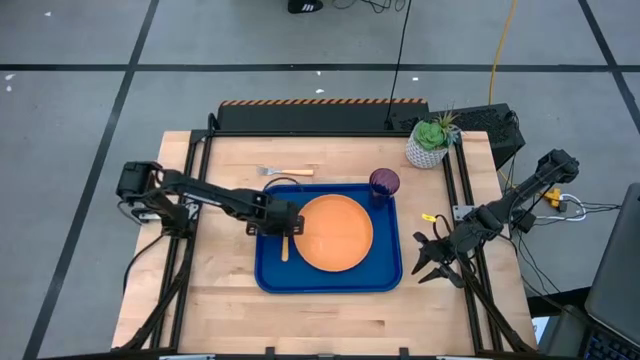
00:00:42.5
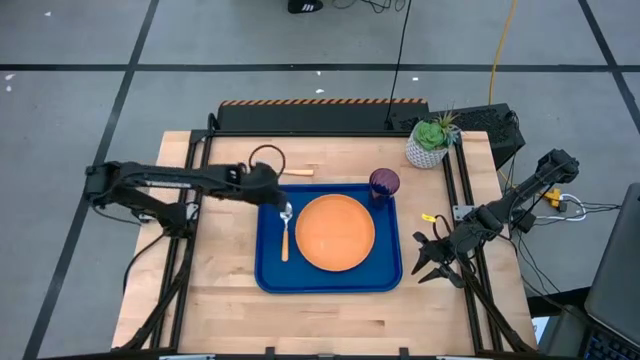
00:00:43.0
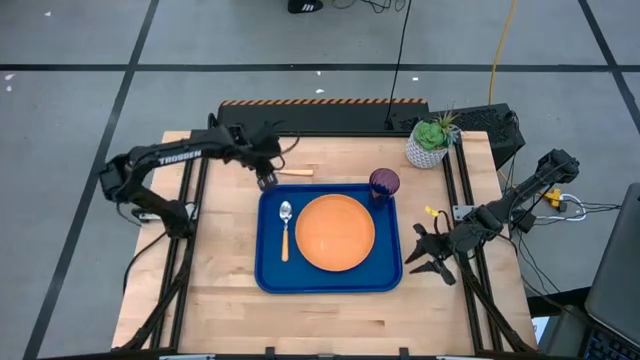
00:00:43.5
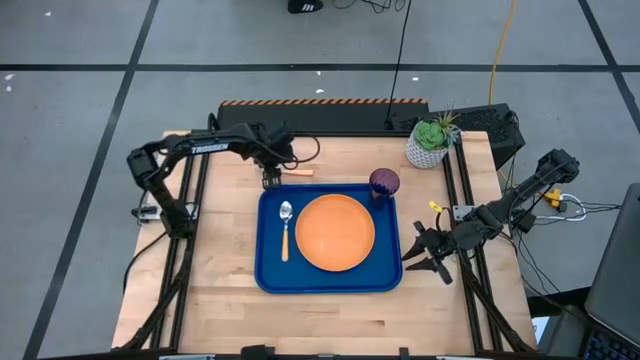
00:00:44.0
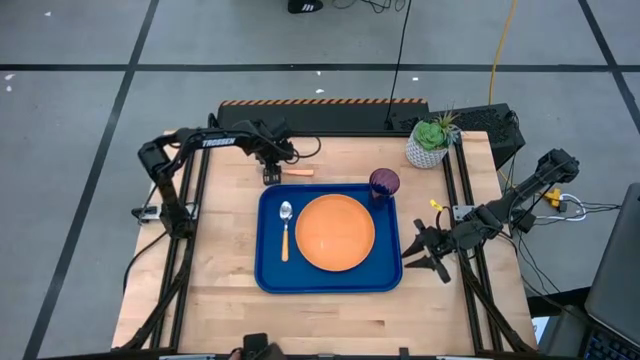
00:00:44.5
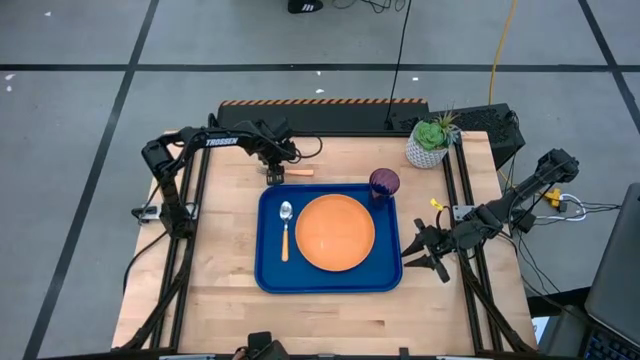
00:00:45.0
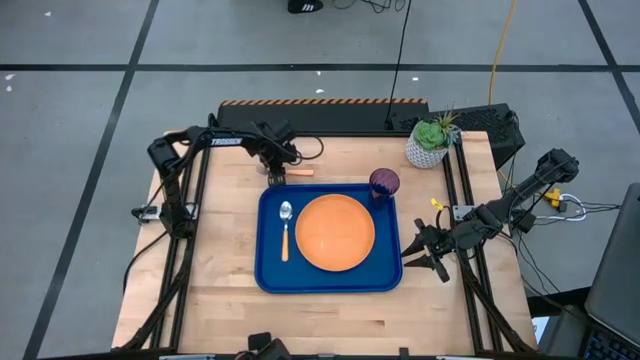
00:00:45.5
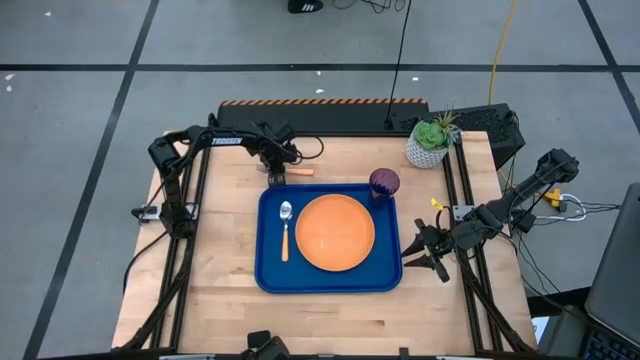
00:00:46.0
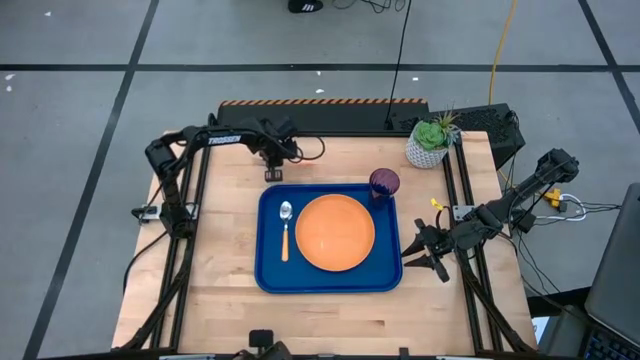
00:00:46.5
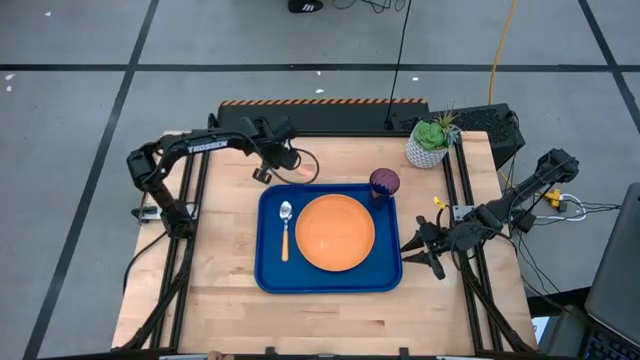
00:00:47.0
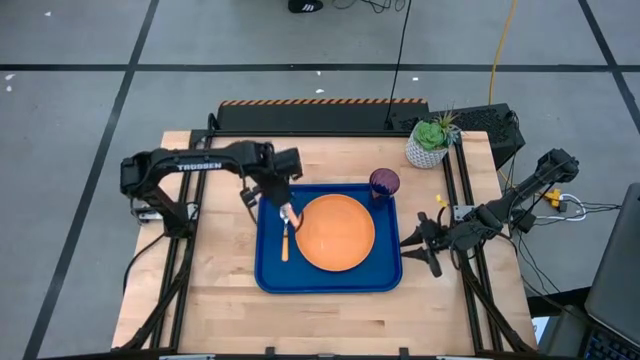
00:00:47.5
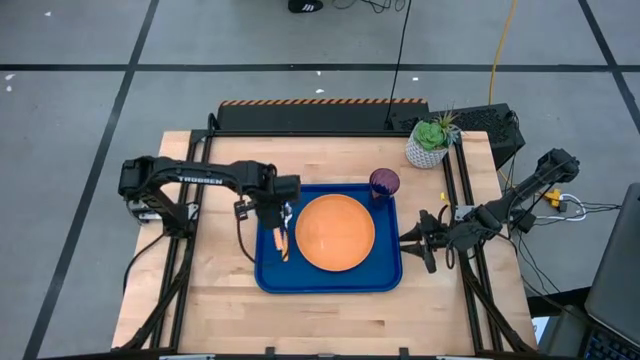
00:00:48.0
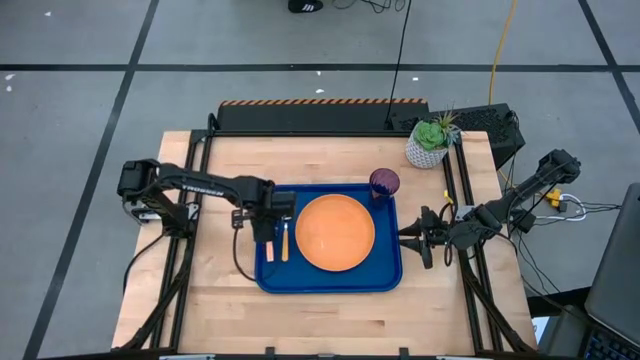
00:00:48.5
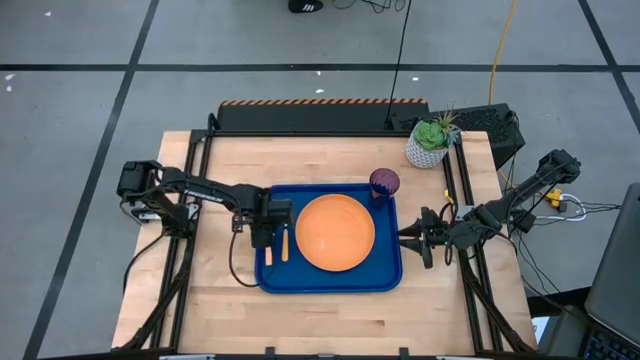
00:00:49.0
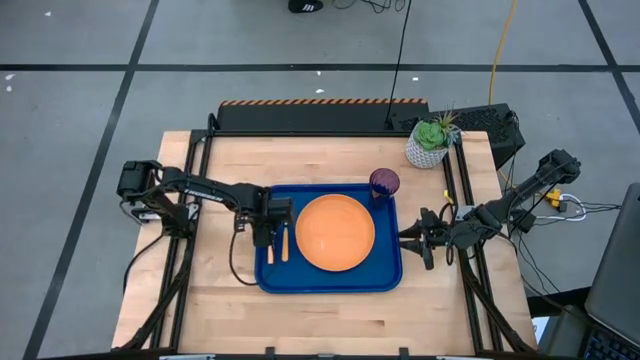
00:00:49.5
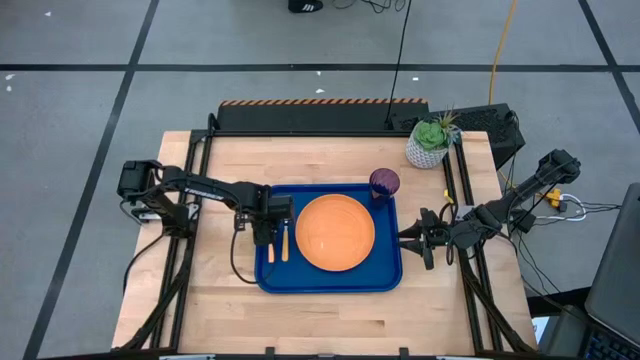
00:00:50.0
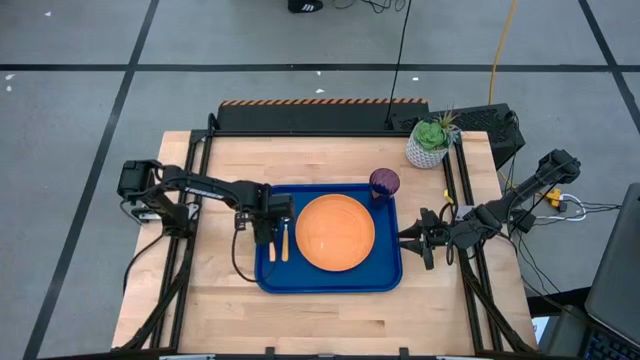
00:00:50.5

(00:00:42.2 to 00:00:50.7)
Task: Pick and place plate/cup/fork/spoon on tray
Put the orange fork to the left of the orange spoon on the blue tray

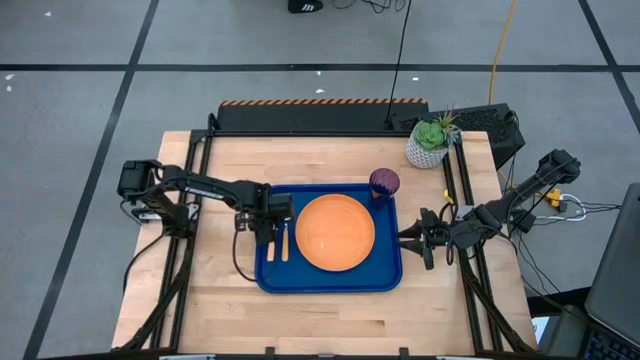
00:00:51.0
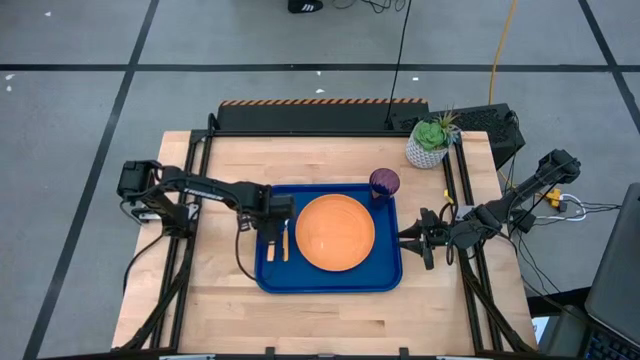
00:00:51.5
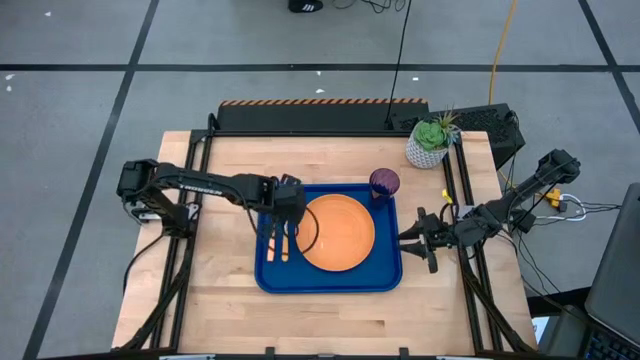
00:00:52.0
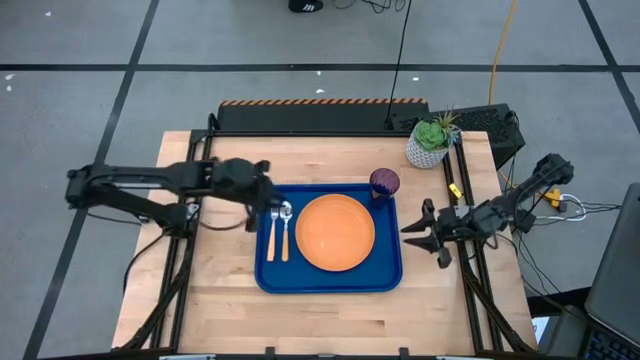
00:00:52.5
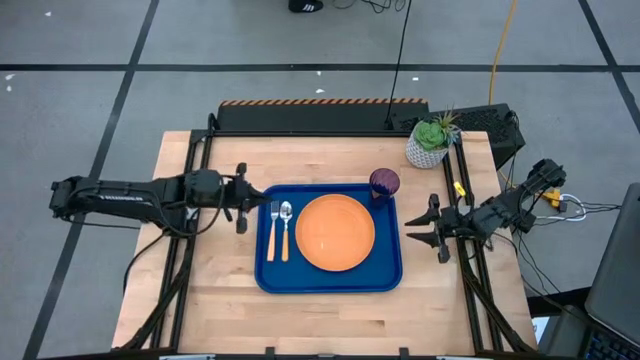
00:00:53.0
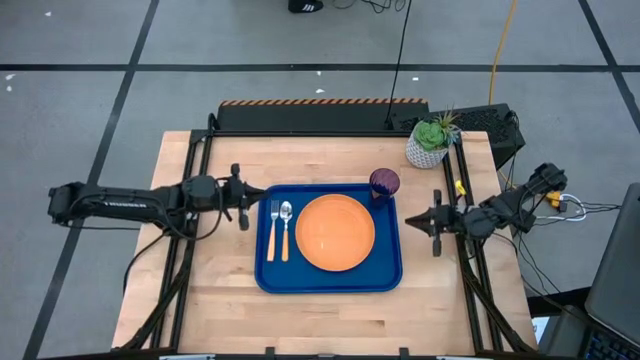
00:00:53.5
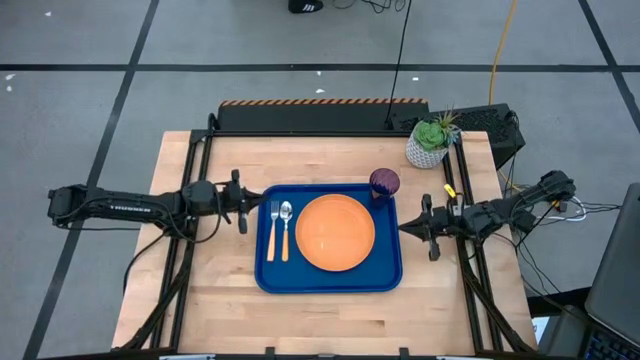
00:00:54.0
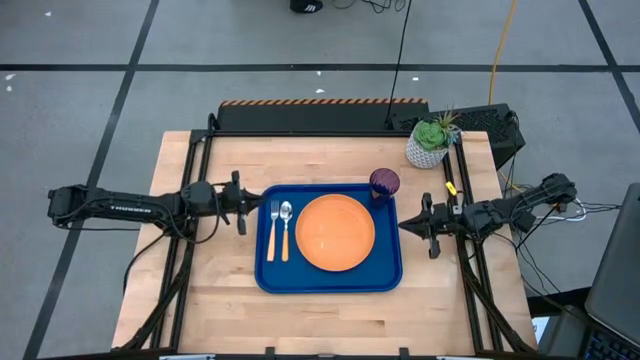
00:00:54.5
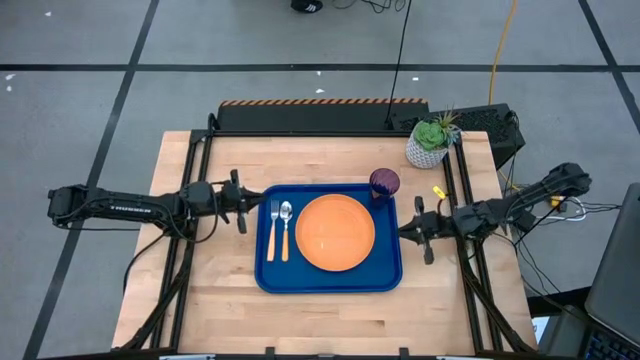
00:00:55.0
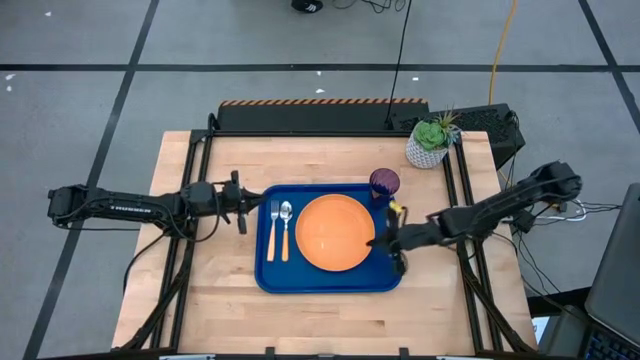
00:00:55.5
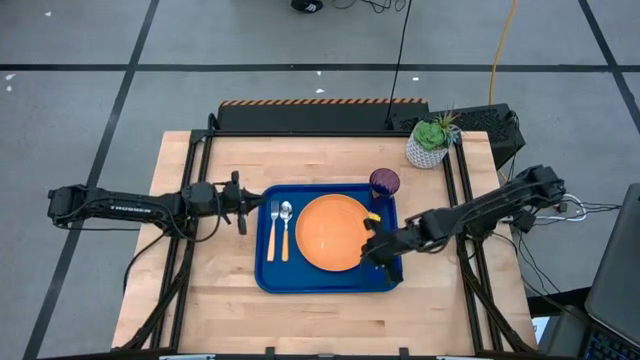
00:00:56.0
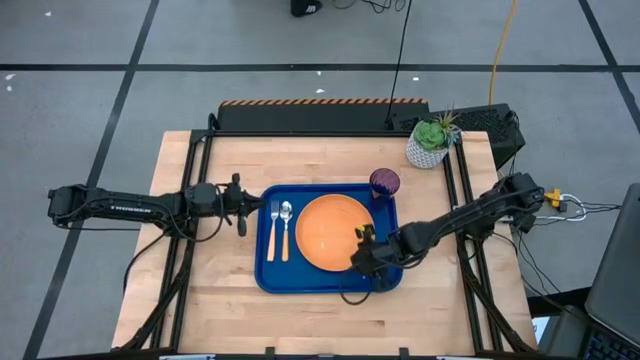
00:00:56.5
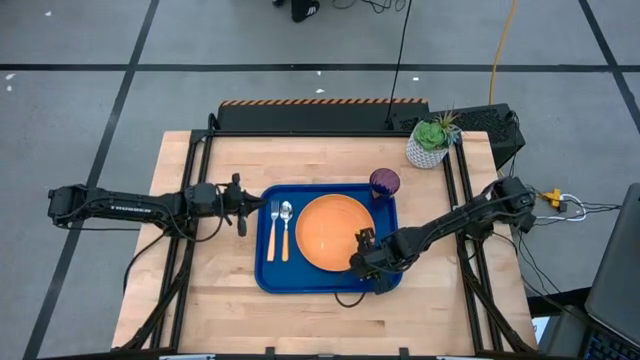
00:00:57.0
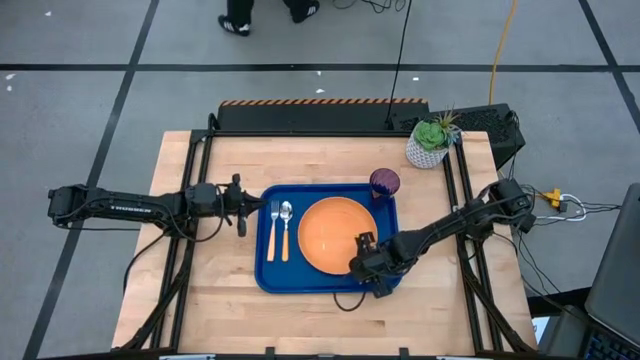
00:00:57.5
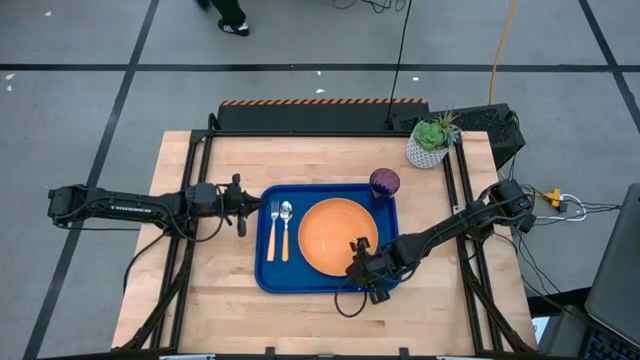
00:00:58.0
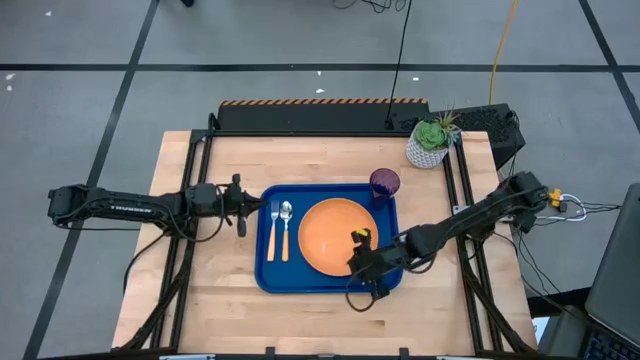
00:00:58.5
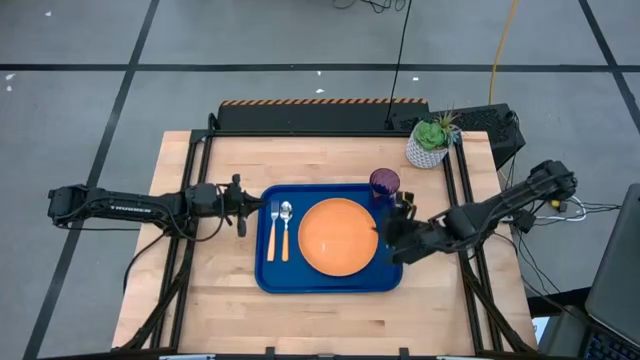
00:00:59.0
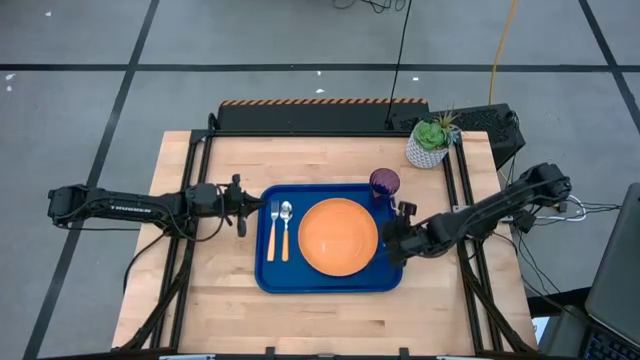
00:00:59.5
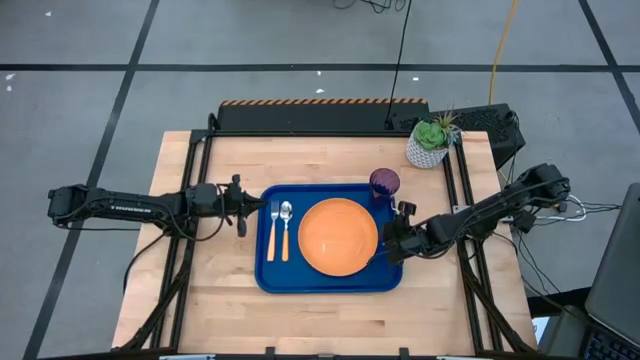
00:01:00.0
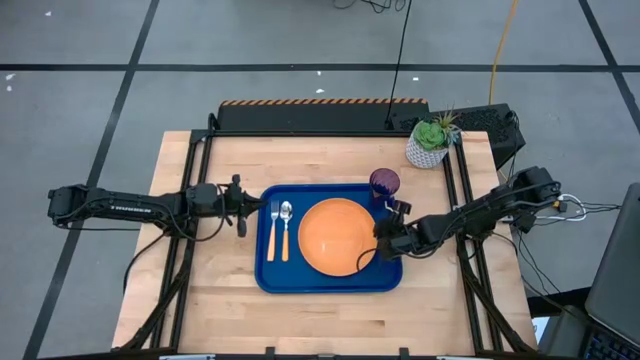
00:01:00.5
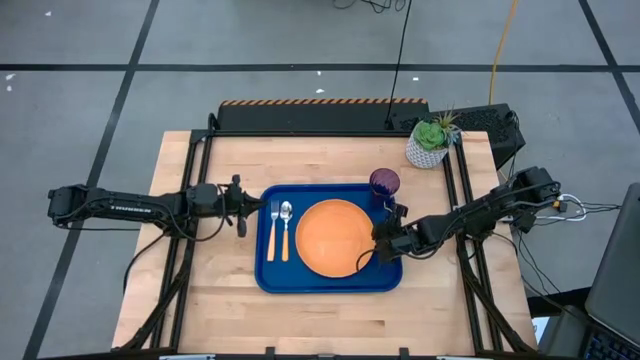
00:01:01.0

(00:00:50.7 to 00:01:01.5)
Adjust the plate on the tray

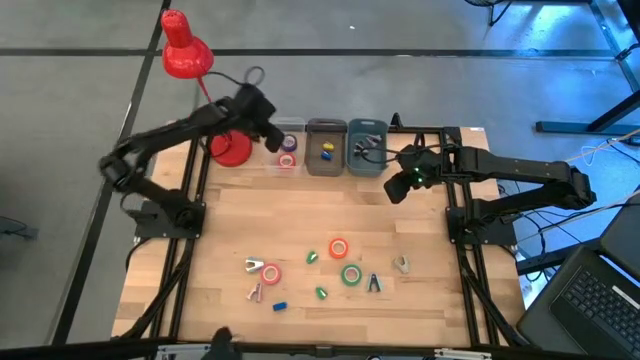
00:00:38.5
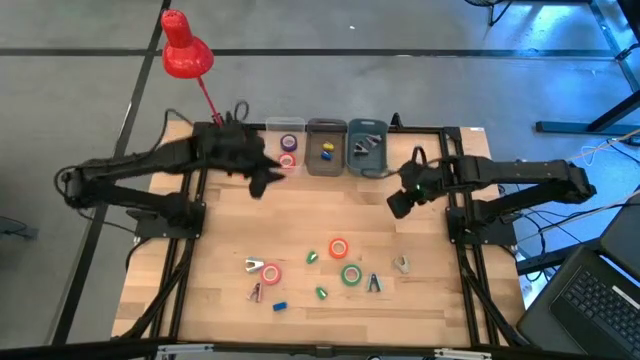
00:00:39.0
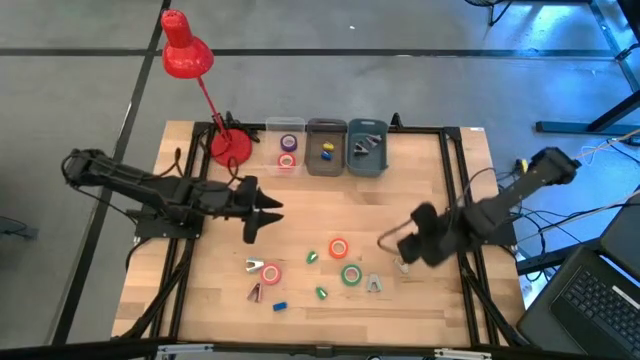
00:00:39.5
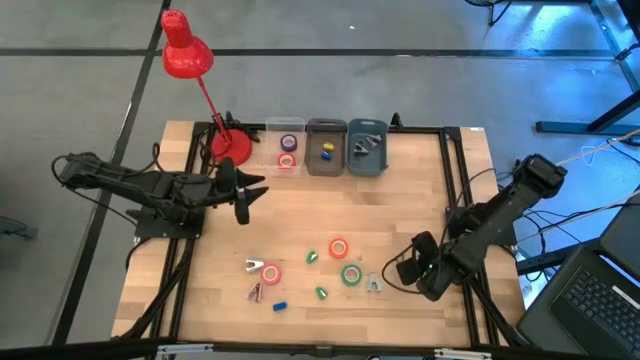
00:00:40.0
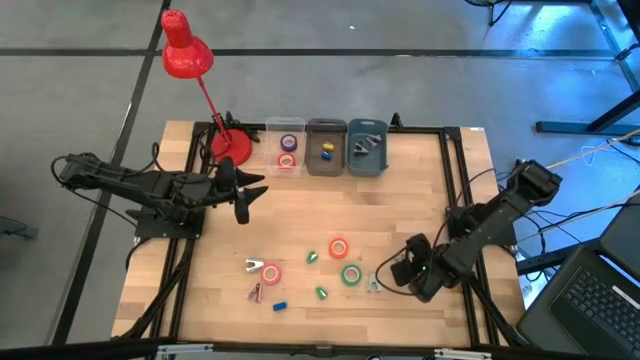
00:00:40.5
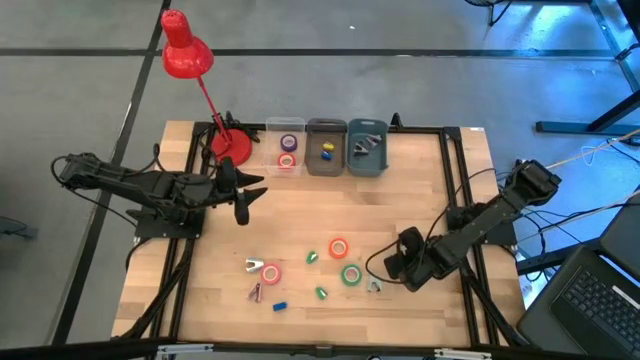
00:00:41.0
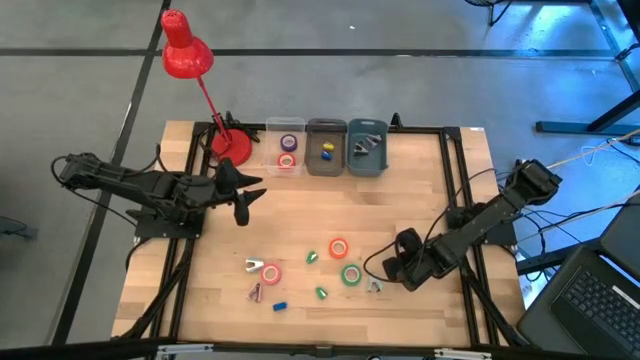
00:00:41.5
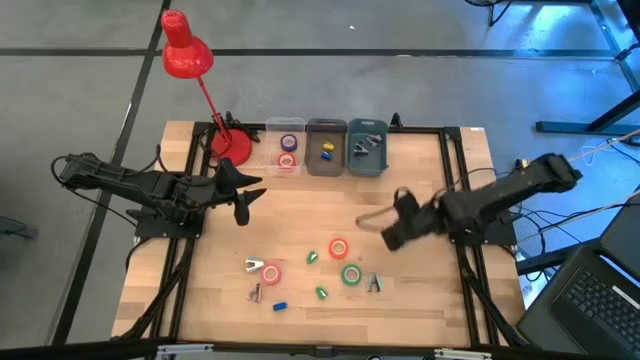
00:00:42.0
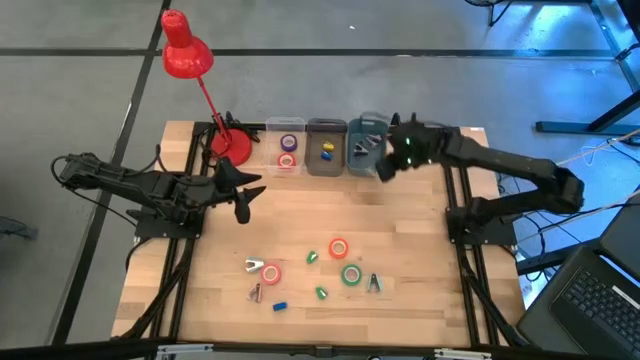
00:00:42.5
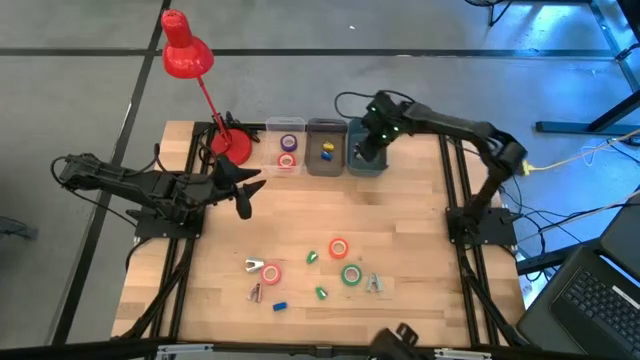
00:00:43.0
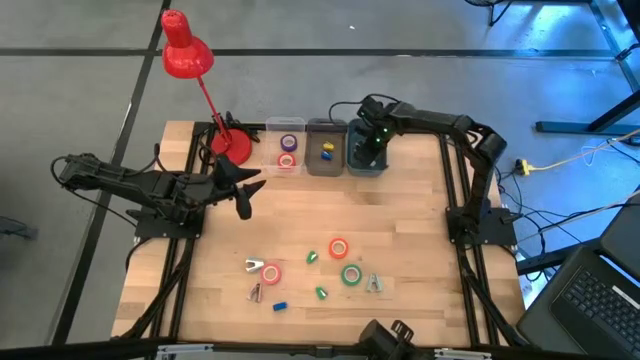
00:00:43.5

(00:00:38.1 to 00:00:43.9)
Task: Pick and place Stapler, Stapler remover, tape
Put the gray staple remover into the blue bin
